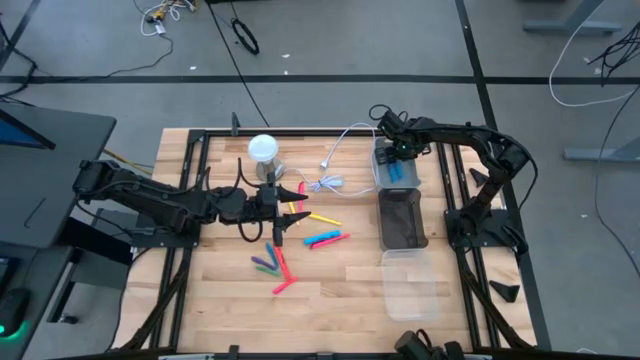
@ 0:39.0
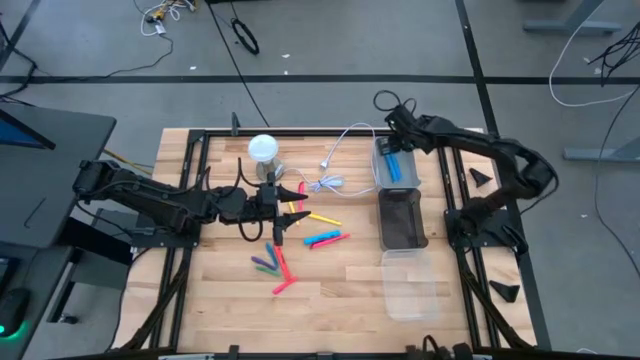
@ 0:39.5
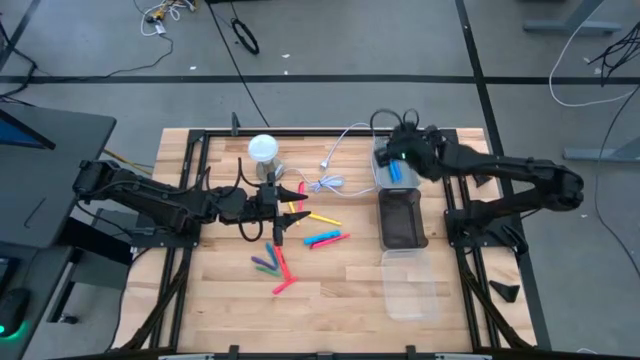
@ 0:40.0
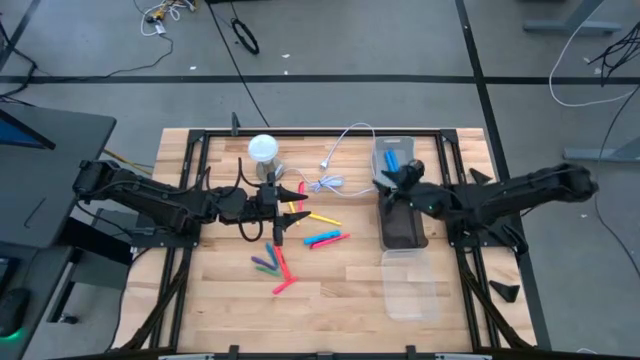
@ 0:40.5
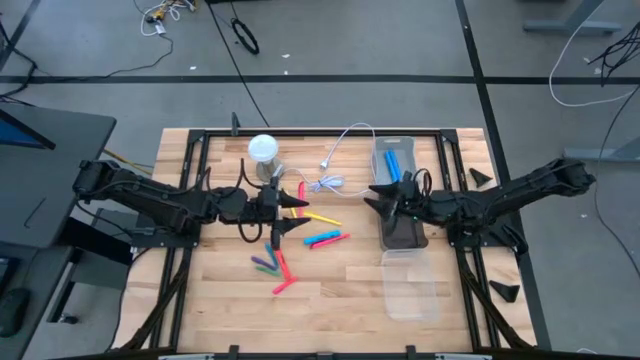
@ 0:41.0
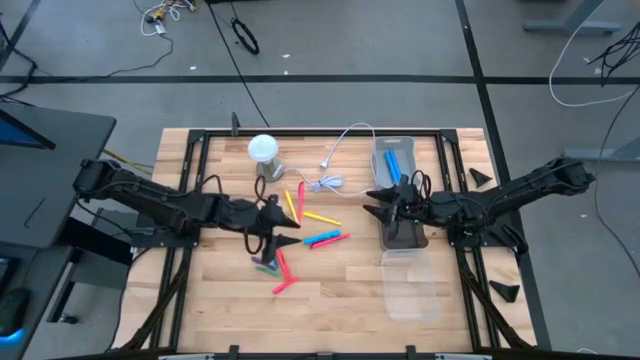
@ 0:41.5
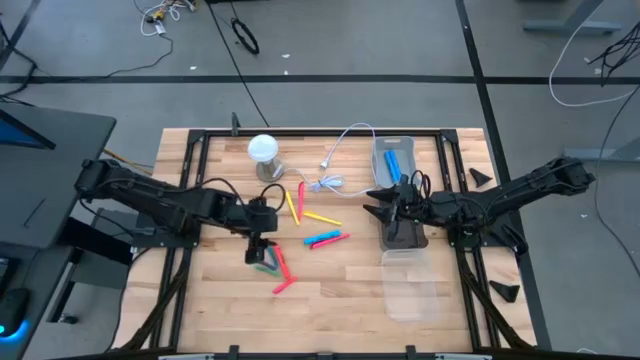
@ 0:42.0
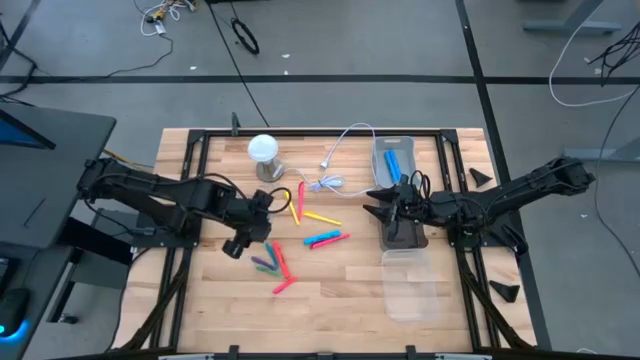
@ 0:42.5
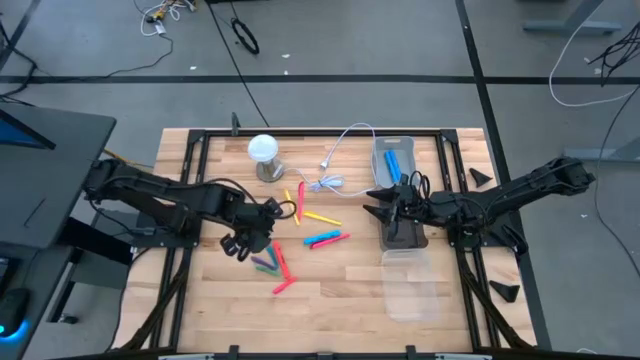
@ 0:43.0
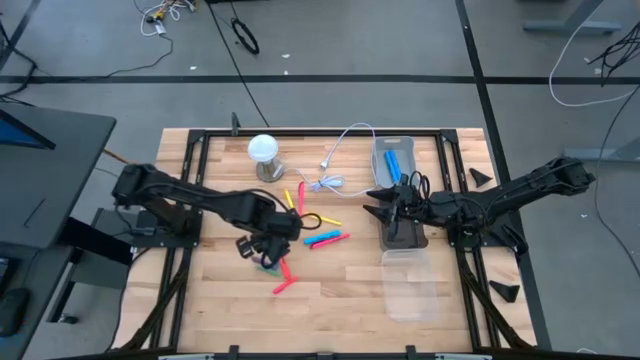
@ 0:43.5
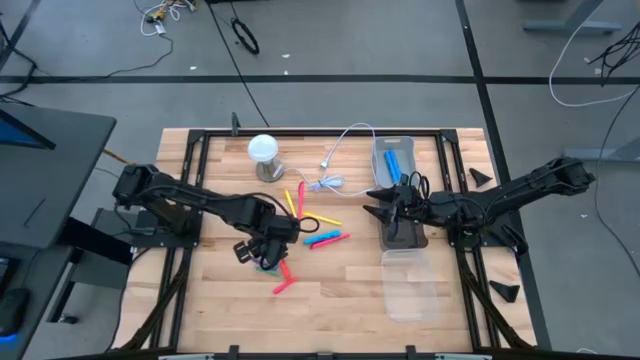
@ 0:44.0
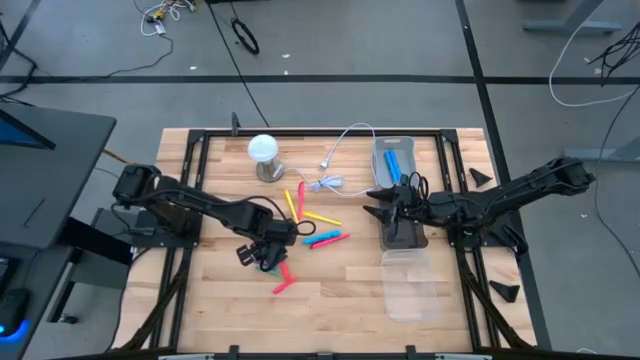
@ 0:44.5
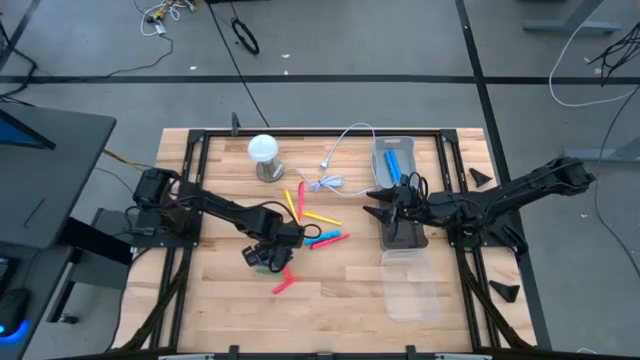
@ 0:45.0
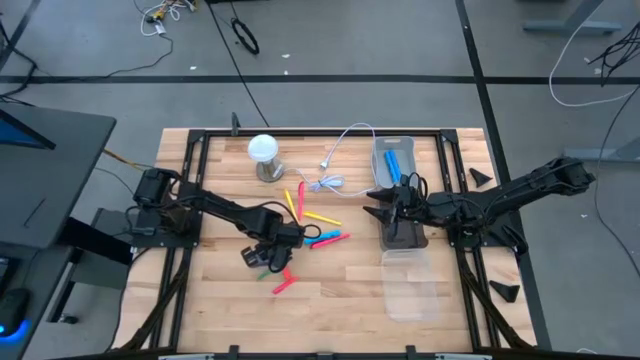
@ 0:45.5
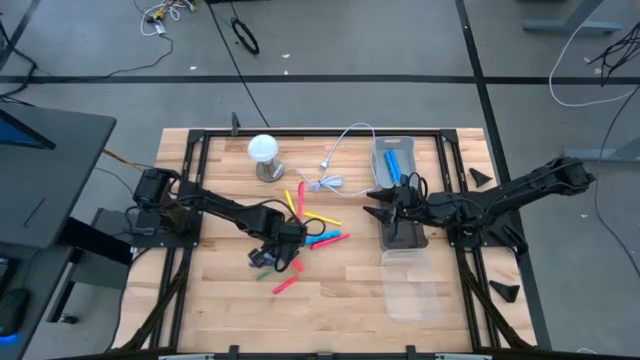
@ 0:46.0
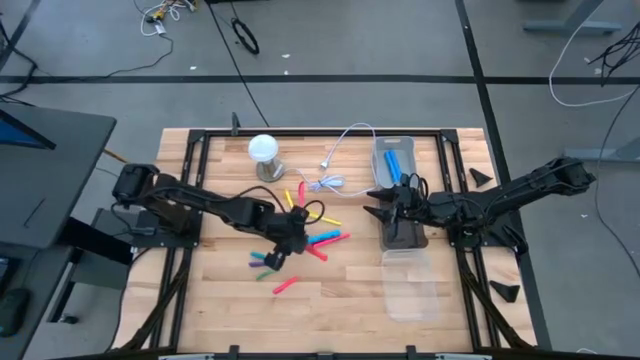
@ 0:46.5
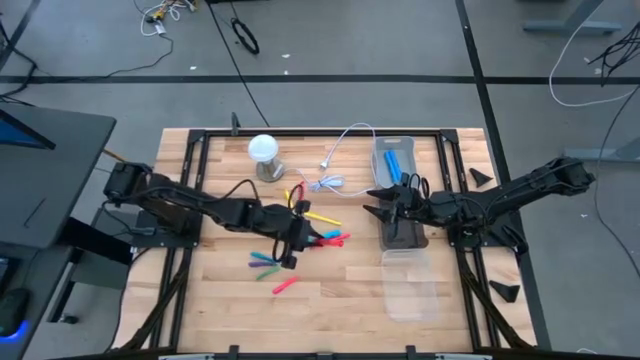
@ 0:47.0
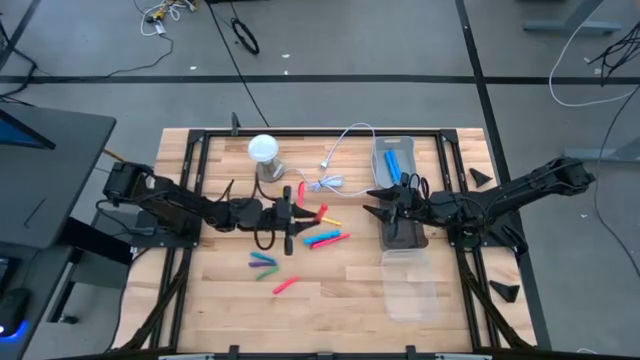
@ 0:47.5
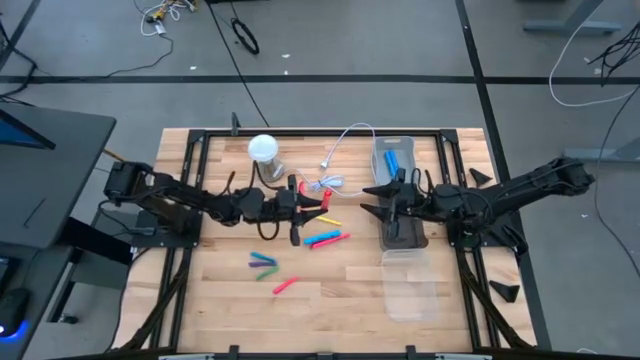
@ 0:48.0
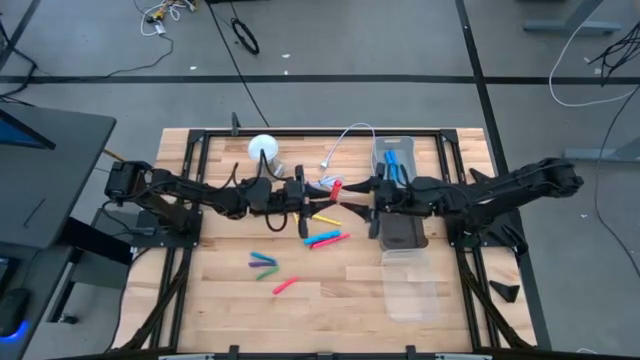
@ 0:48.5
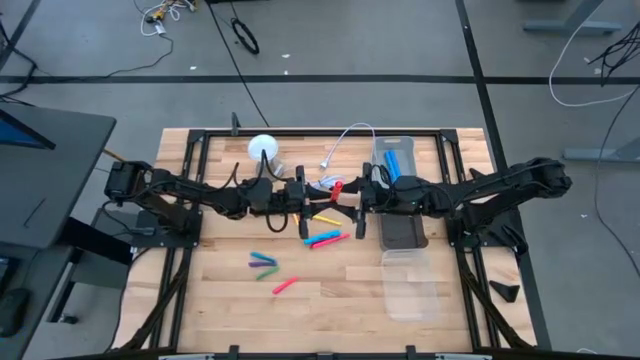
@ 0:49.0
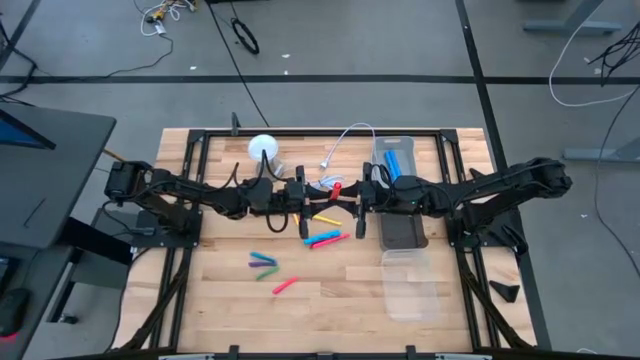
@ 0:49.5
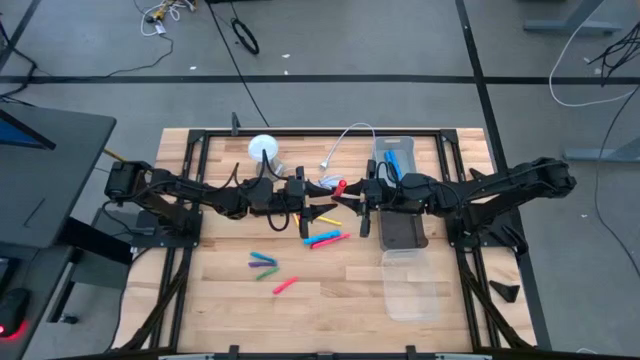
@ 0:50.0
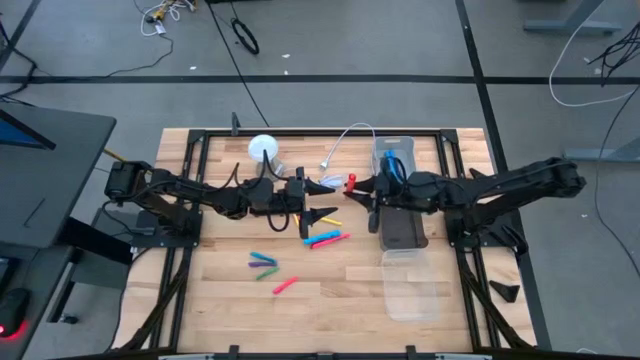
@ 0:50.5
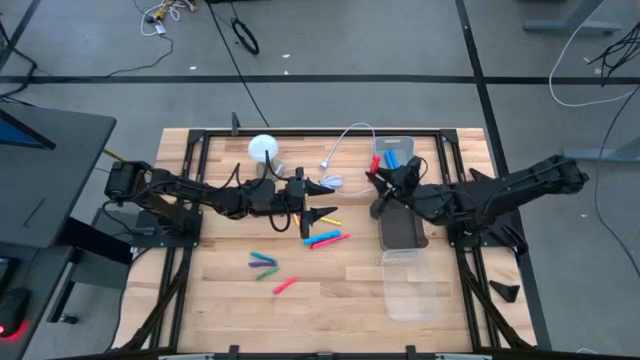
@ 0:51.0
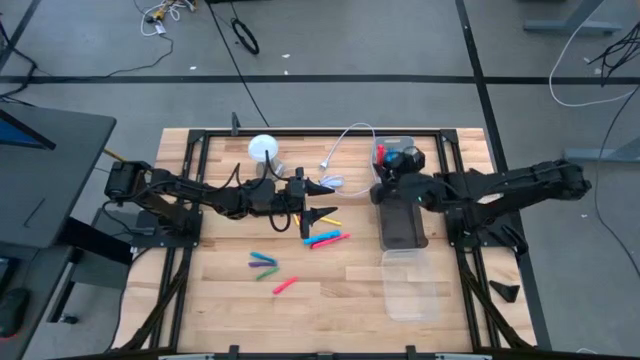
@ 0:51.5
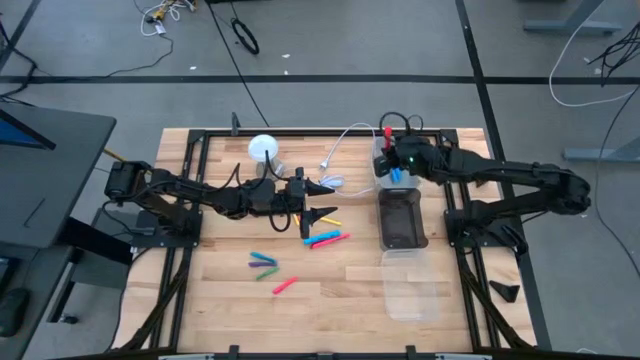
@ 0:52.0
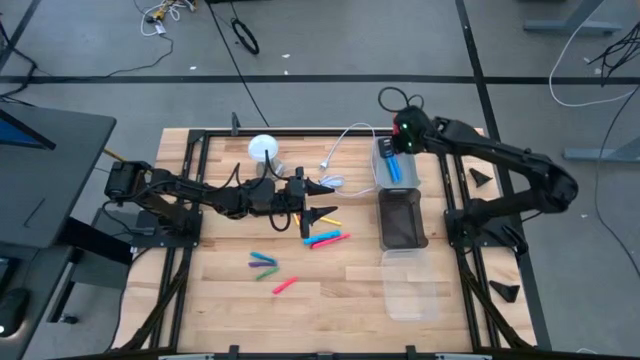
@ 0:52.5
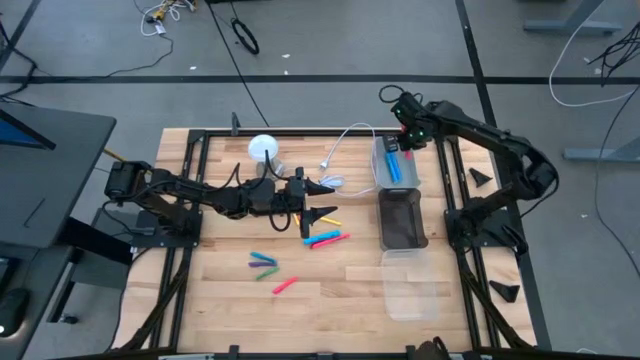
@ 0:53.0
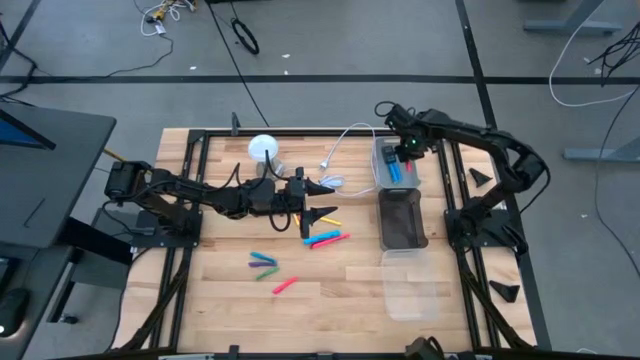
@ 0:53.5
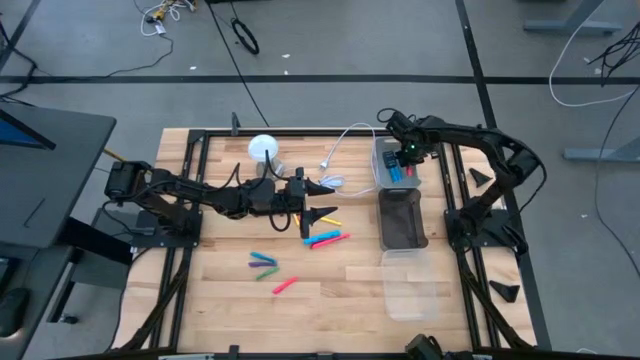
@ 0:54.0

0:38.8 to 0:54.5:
Task: Pick & Place Markers
Put the pink highlighter into the gray bin
